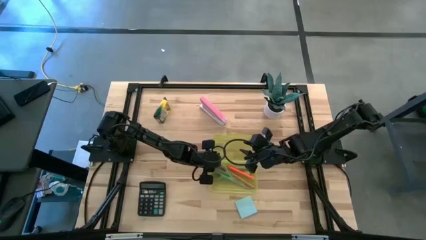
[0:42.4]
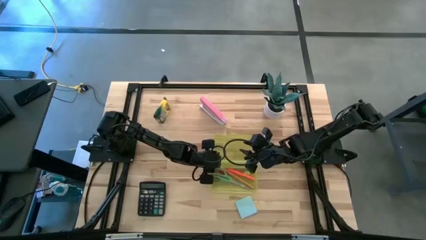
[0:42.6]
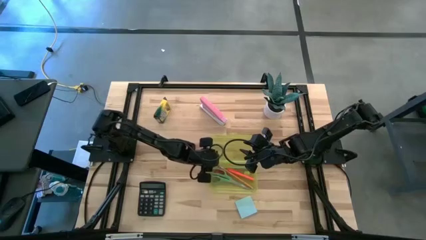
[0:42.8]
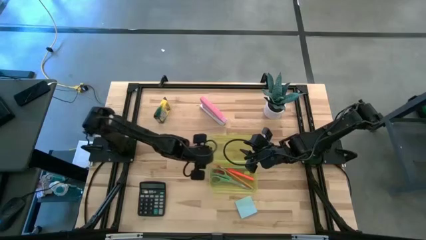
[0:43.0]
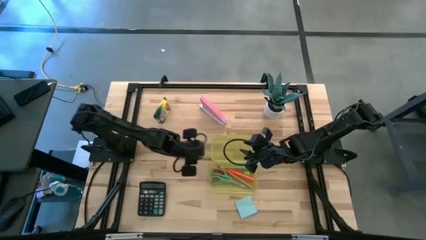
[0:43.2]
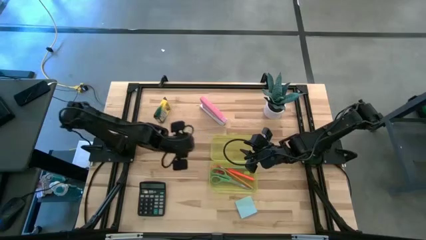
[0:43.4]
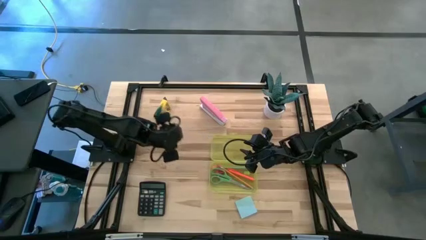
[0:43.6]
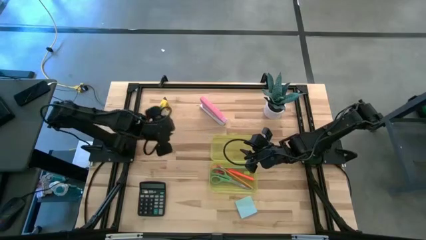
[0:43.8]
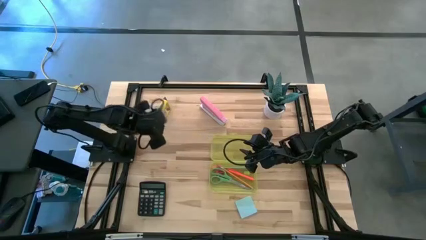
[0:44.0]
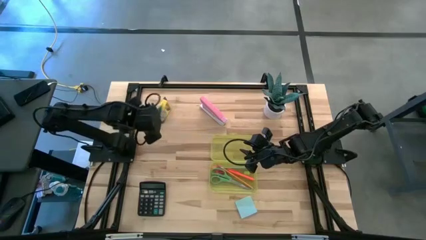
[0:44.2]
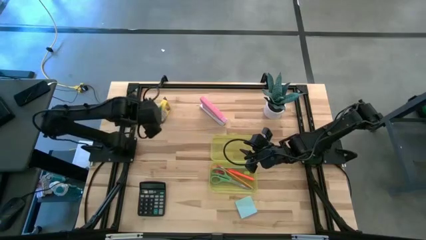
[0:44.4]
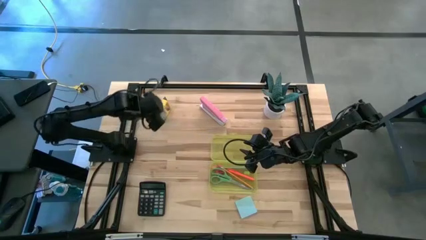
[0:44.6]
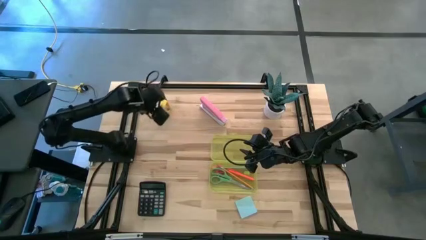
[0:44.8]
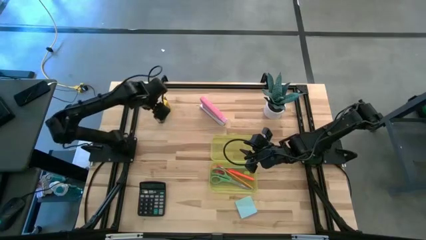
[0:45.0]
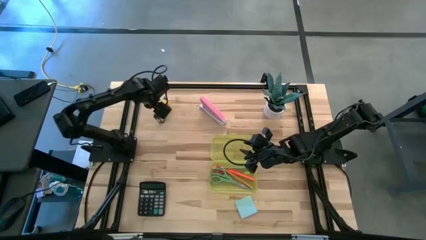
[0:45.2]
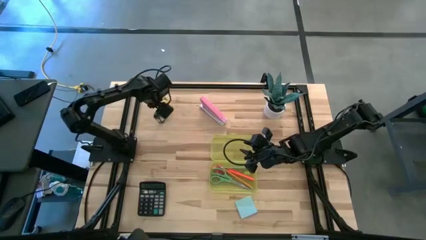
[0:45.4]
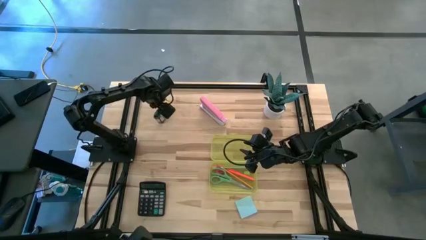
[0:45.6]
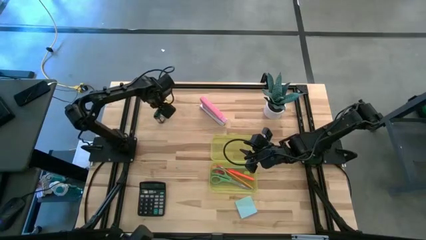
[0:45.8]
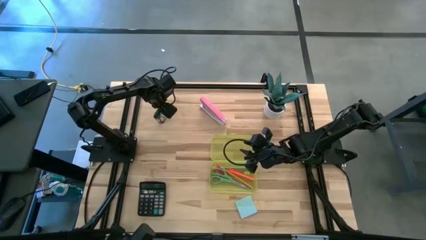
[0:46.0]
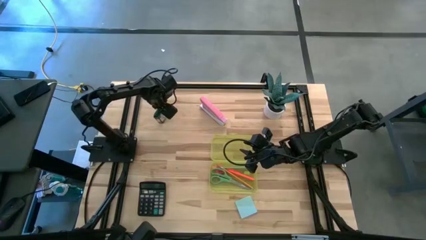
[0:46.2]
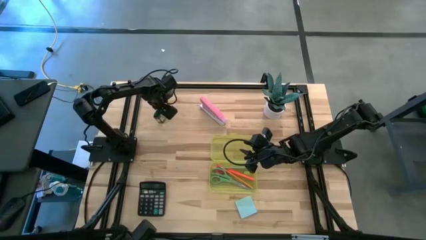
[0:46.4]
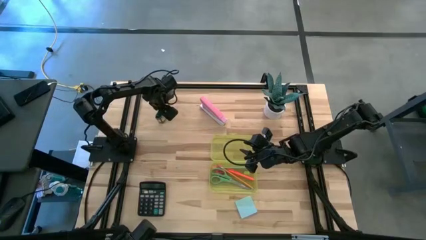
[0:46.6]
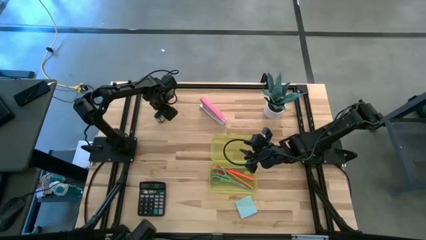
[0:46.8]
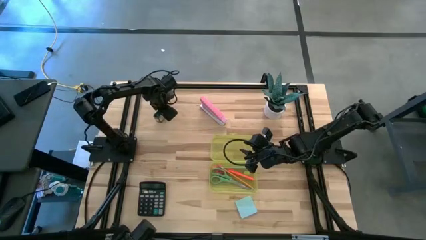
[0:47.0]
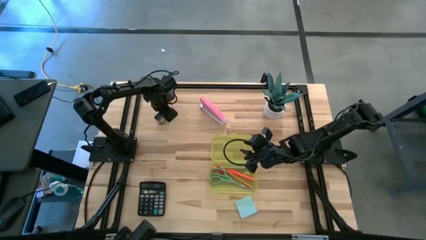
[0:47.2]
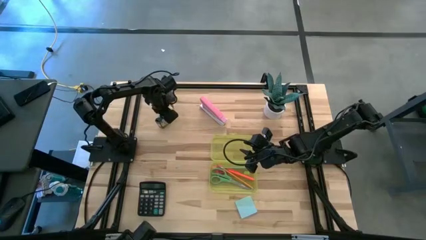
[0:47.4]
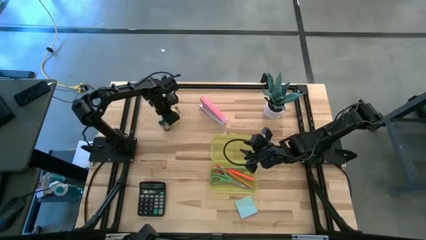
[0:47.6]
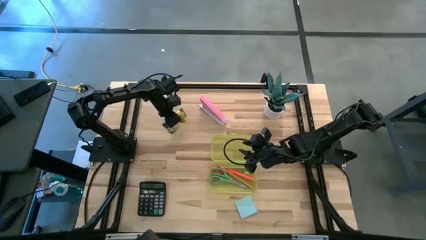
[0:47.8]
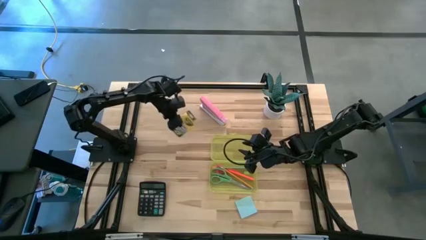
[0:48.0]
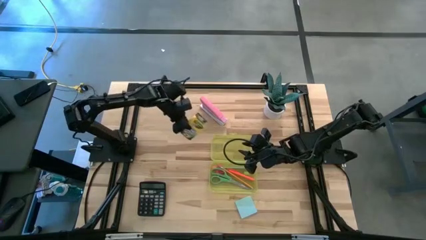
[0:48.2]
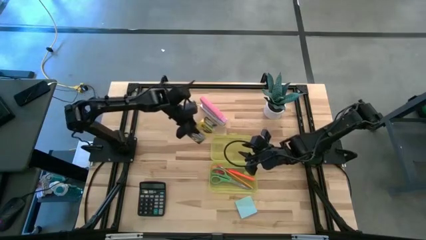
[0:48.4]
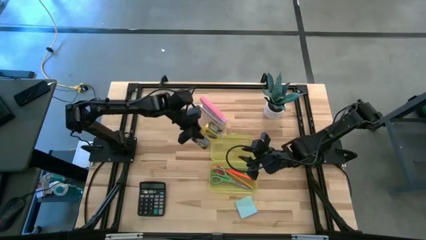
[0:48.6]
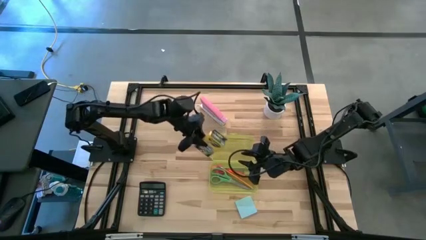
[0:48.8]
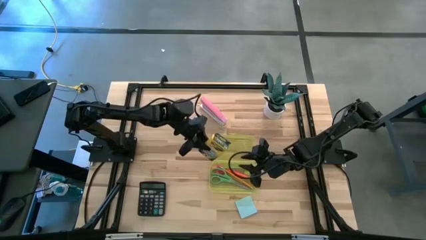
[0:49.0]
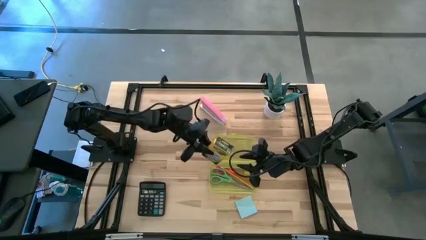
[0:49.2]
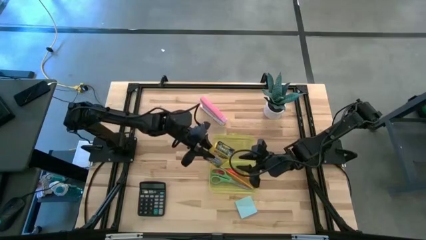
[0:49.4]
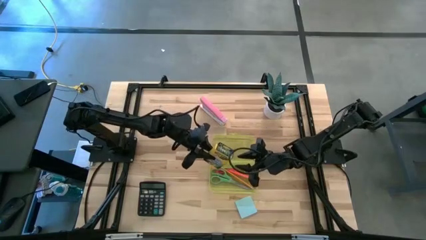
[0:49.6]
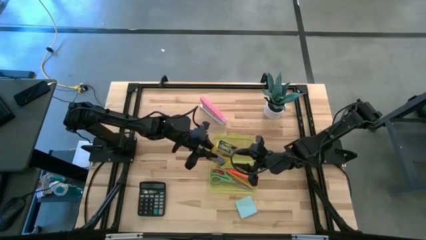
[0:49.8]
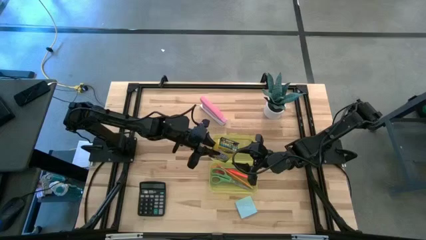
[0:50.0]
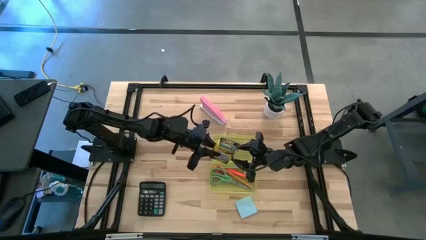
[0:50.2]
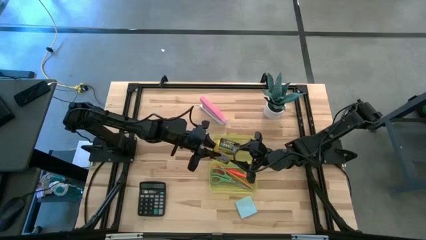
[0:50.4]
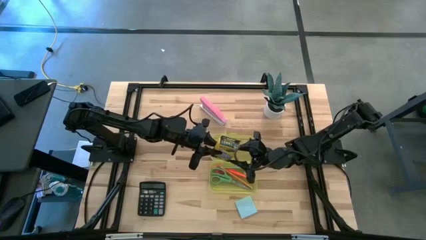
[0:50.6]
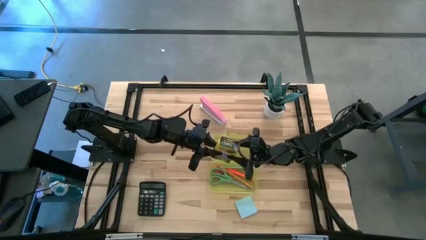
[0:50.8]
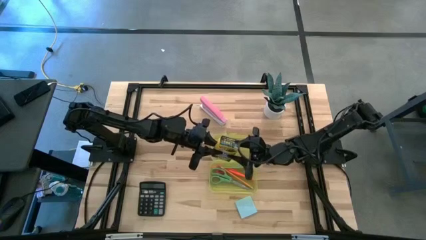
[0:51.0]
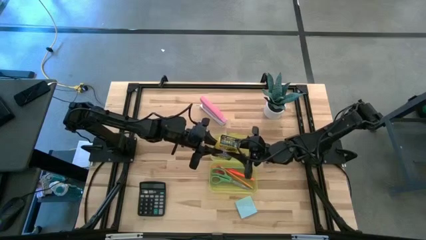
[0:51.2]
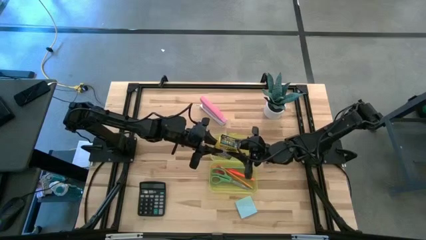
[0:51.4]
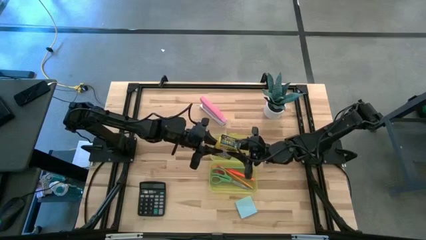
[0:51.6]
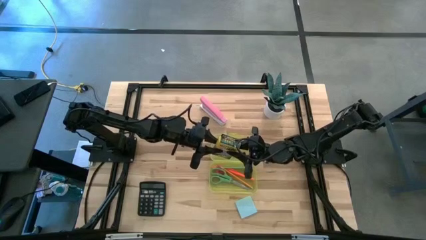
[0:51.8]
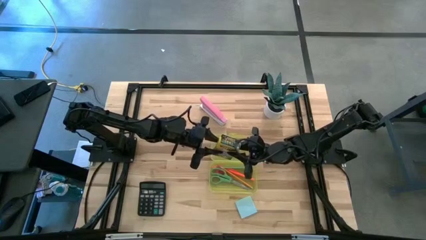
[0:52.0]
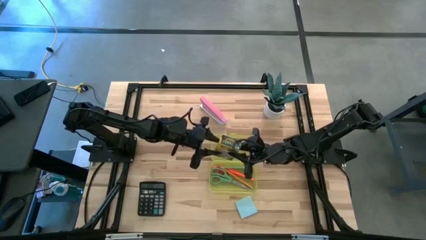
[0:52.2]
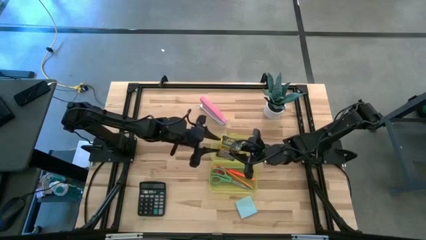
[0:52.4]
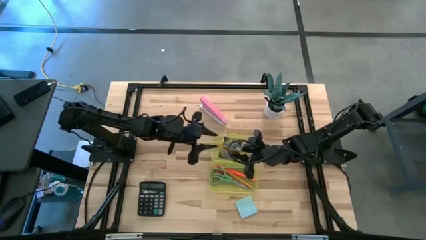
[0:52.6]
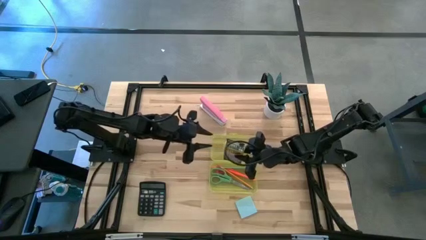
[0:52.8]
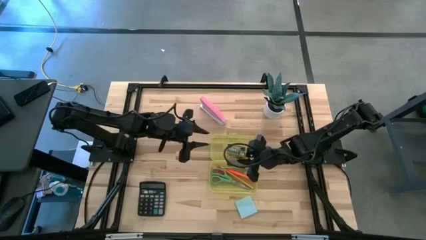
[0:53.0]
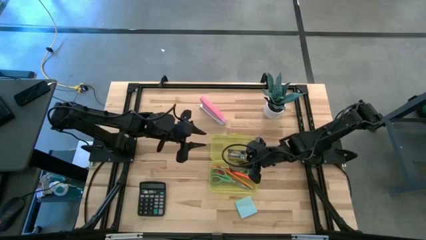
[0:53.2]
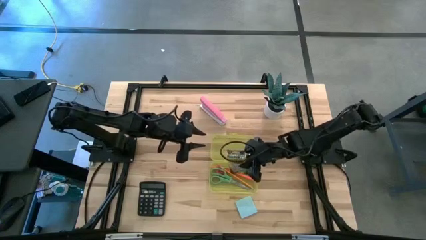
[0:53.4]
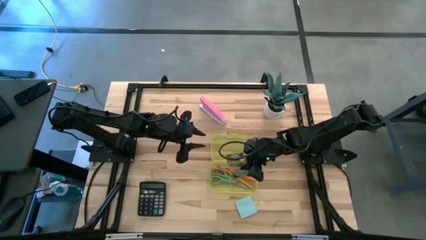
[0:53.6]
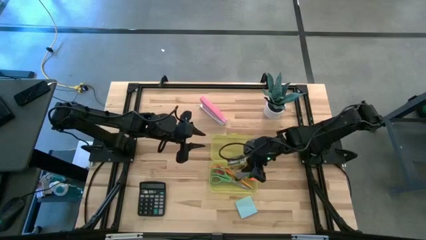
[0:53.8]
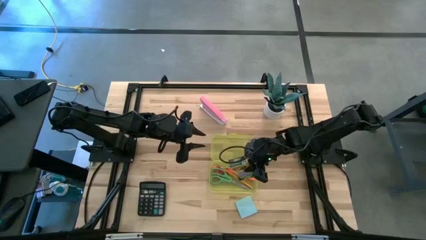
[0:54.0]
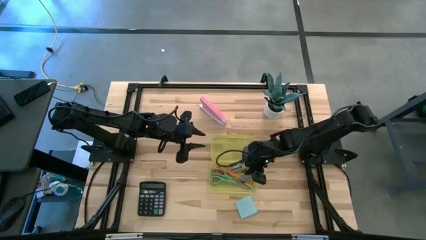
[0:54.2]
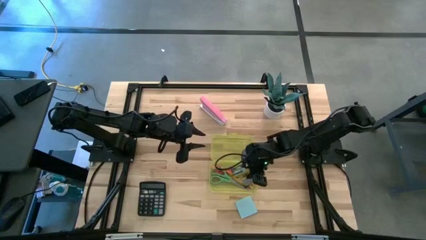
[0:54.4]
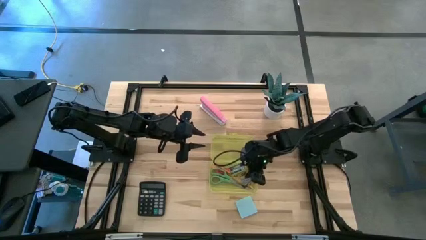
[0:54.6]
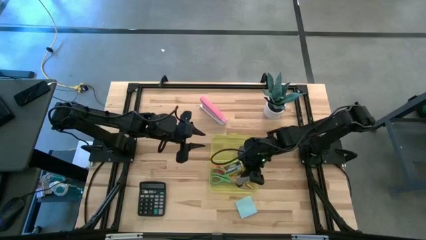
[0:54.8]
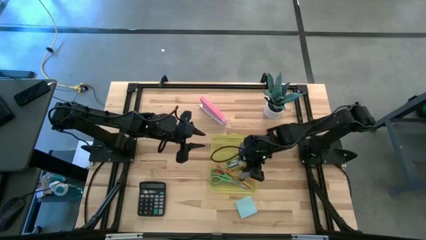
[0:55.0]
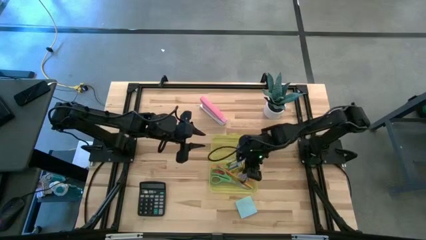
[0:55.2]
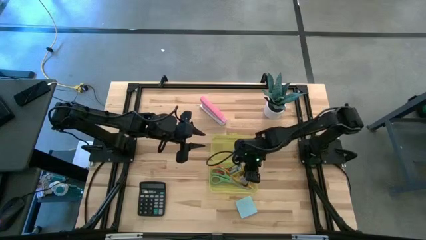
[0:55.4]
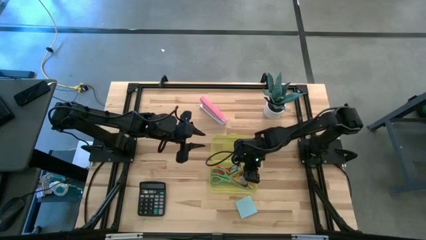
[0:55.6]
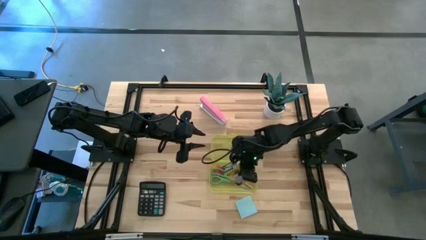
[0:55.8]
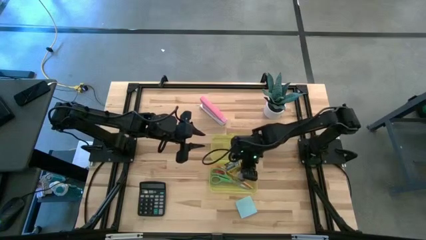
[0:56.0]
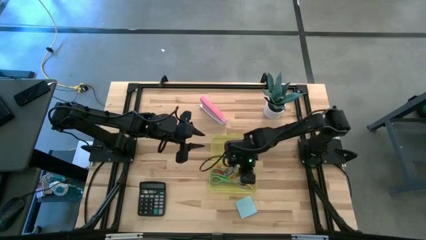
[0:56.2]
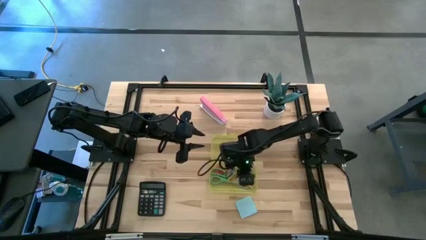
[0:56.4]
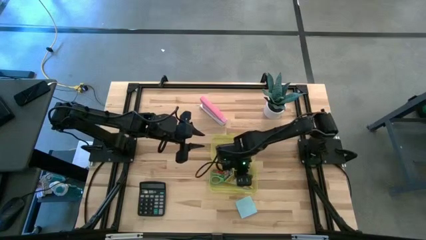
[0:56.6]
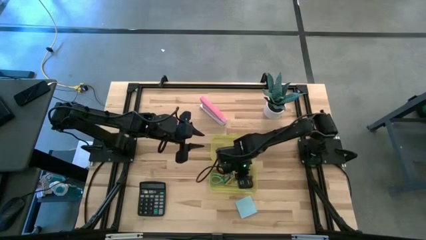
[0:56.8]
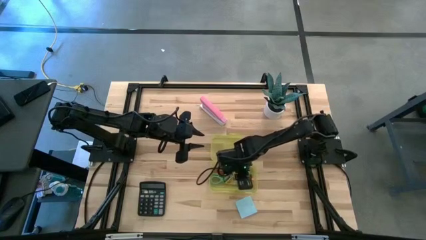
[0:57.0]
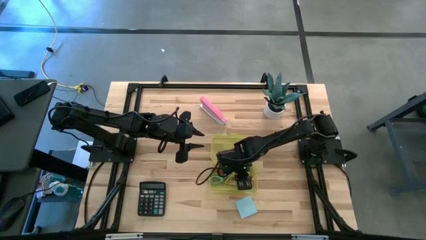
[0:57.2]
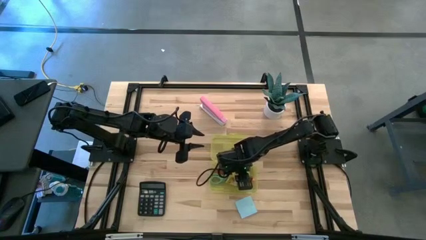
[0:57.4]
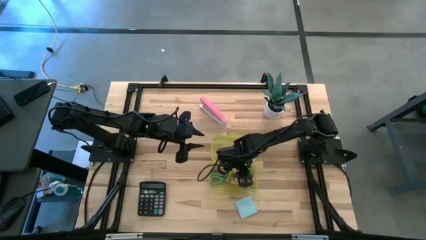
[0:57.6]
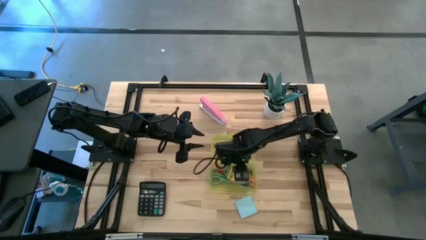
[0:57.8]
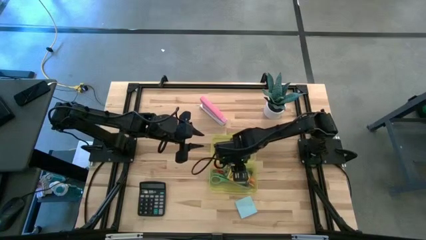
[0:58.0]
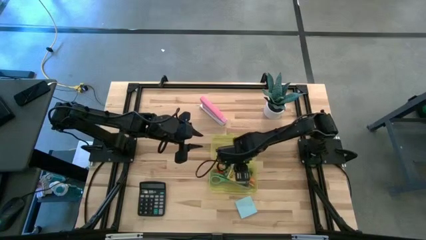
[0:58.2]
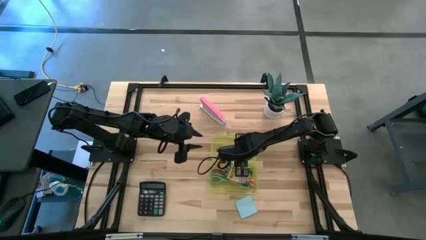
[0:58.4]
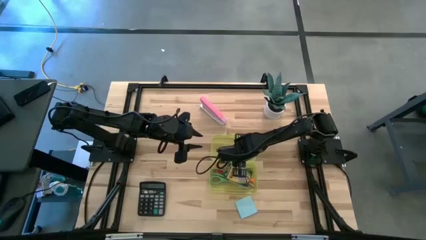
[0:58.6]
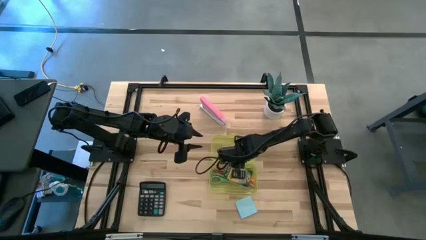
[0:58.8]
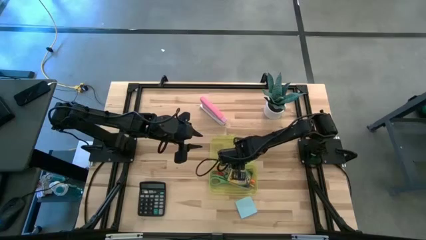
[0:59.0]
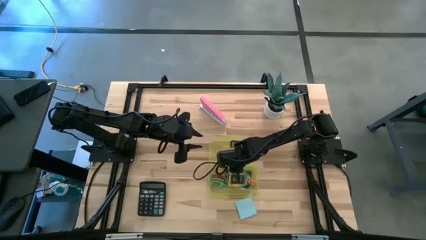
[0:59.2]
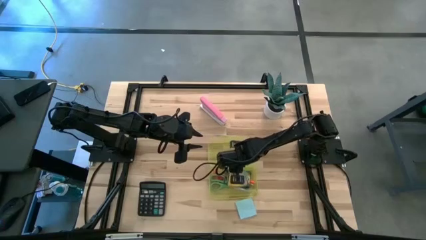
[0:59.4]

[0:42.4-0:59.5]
Task: Pack school essentials
Put the yellow crayon box into the yellow supply box
